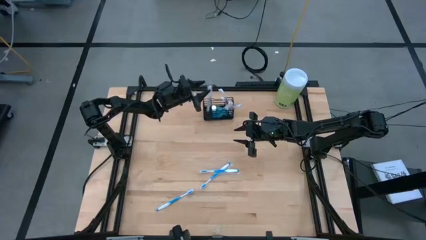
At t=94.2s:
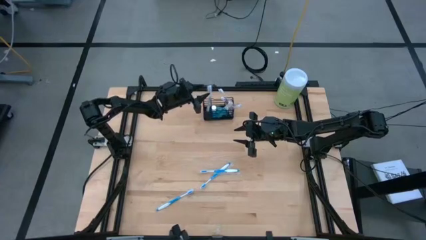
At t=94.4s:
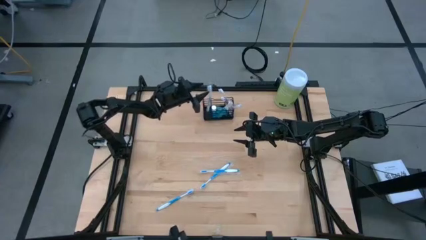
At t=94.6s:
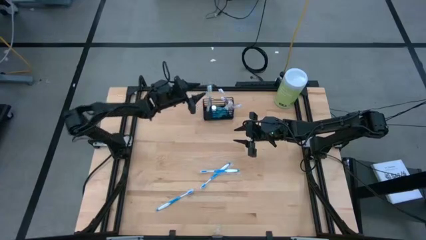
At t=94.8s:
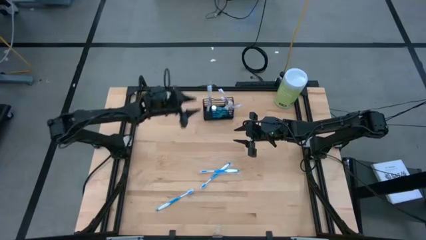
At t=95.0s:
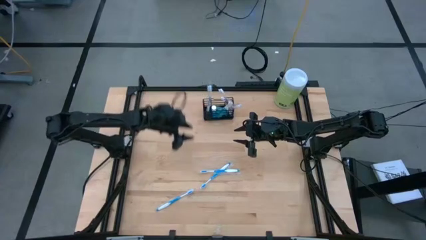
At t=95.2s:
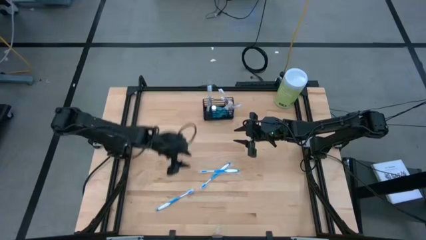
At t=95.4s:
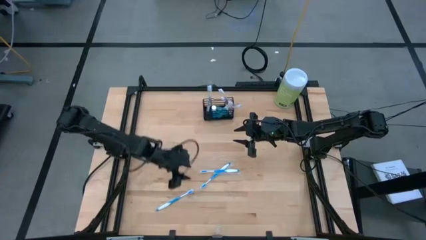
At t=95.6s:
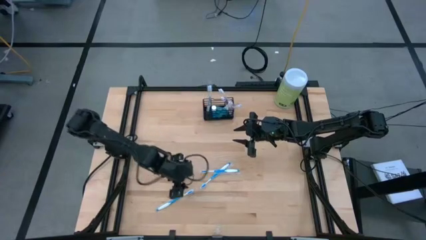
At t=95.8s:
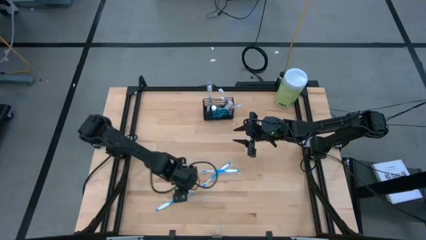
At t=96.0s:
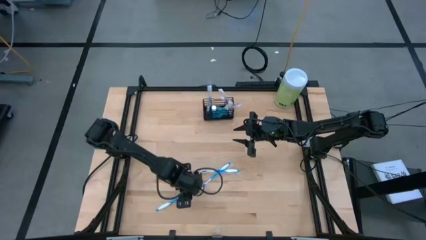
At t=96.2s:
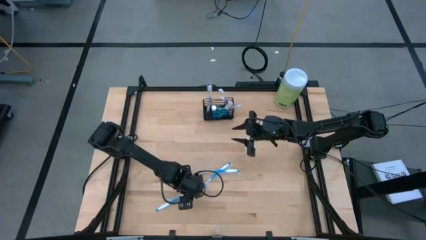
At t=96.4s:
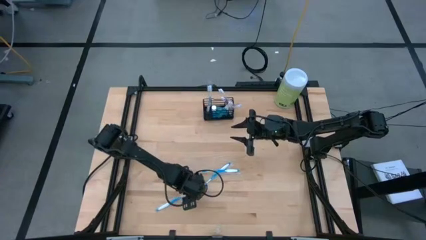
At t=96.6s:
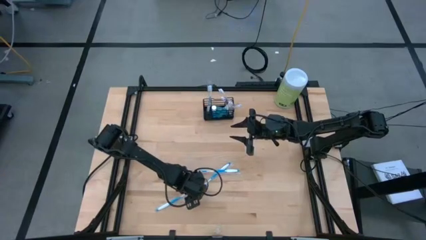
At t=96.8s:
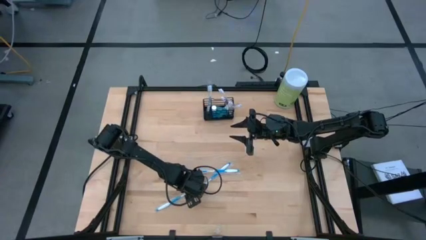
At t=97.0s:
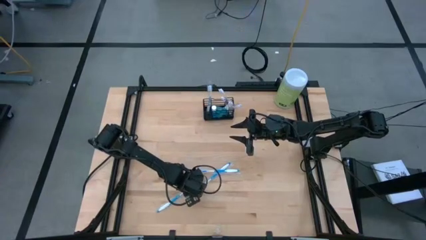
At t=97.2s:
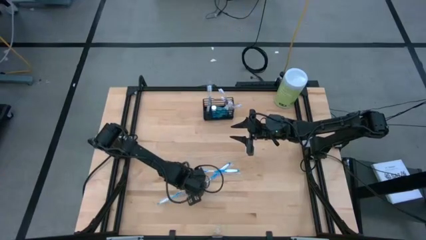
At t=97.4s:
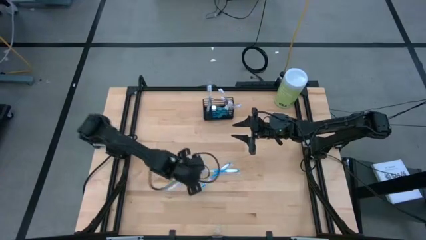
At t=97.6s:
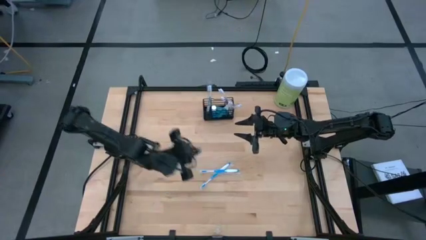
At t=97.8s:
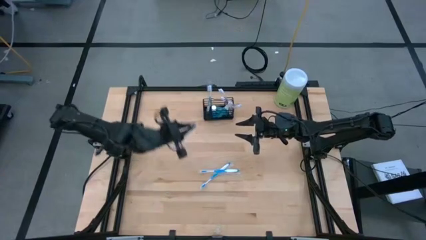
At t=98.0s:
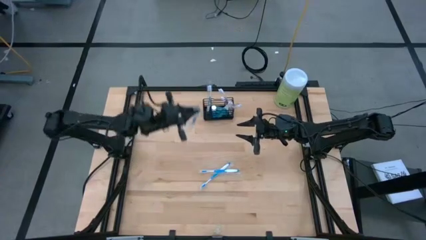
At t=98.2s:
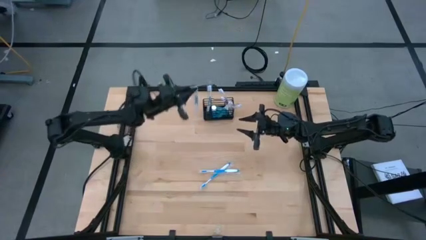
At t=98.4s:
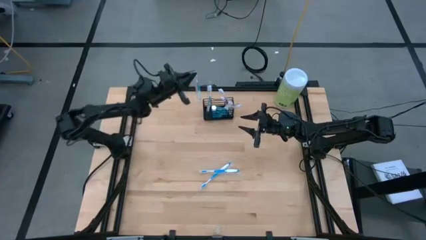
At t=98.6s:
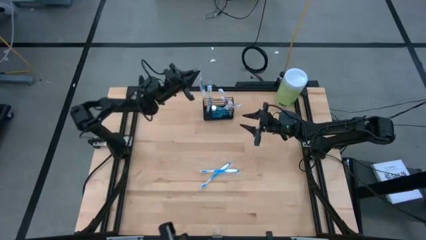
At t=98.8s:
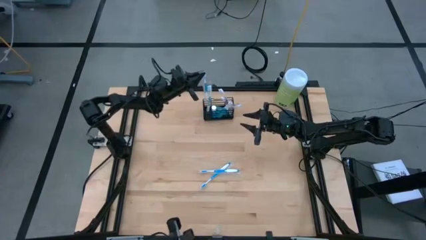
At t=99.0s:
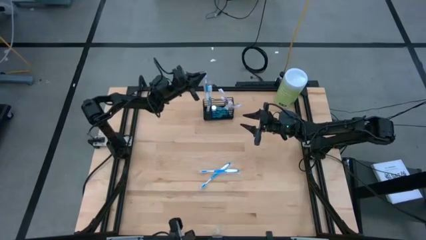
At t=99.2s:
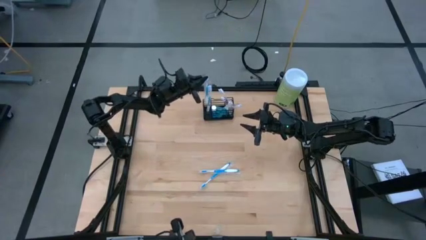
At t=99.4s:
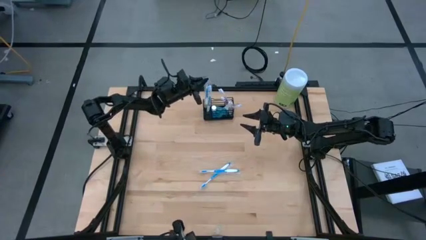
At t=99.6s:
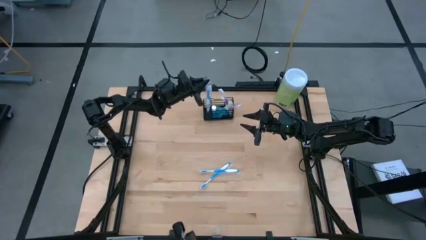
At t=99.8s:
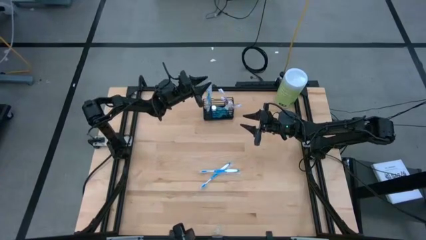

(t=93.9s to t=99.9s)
Task: Pick & Place toothbrushing station
Put the blue toothbrush into the left compartment of the wire organizer

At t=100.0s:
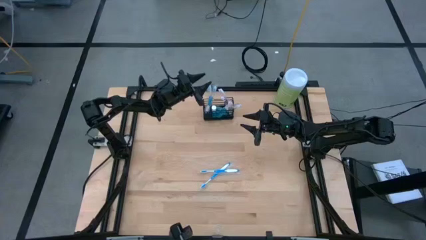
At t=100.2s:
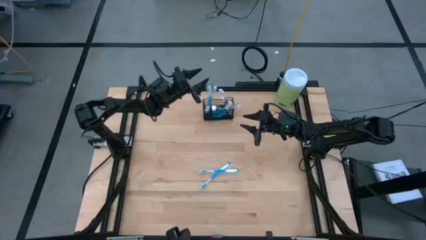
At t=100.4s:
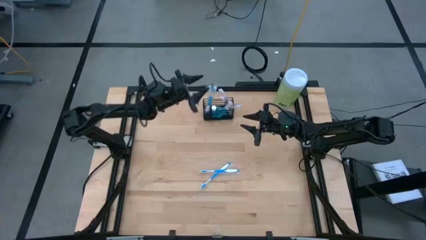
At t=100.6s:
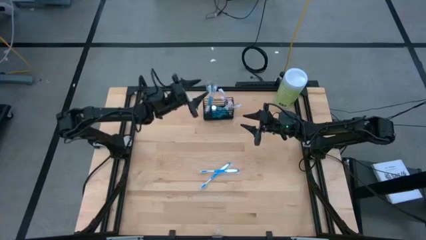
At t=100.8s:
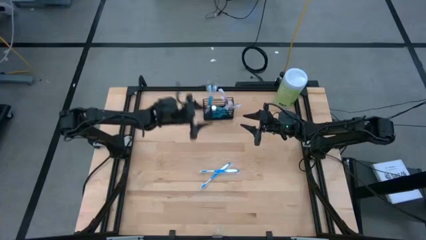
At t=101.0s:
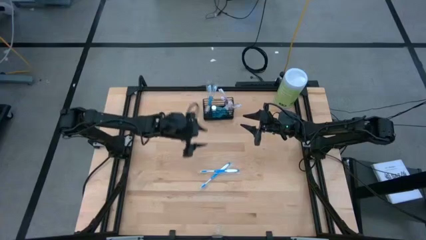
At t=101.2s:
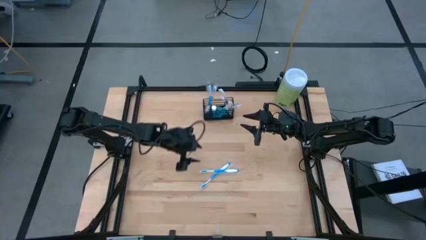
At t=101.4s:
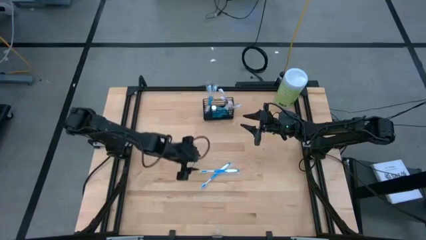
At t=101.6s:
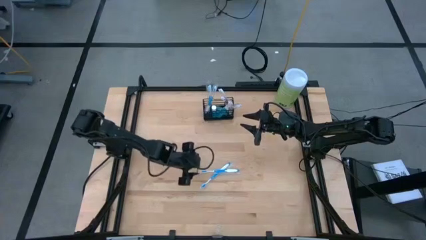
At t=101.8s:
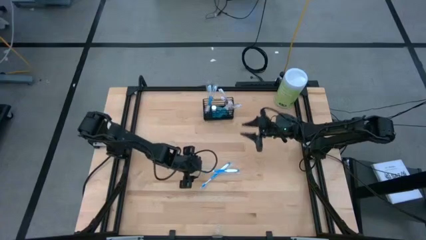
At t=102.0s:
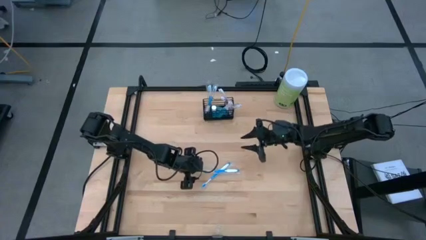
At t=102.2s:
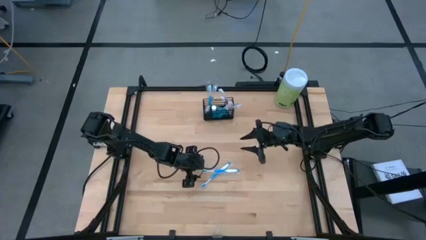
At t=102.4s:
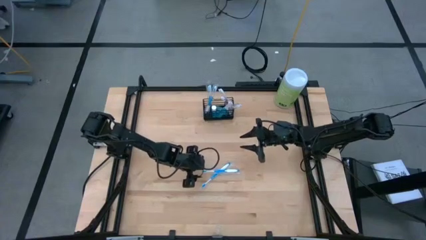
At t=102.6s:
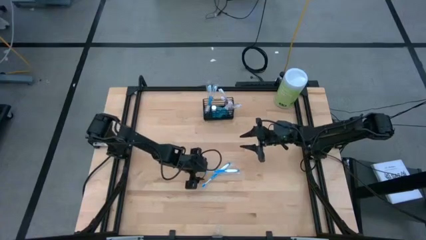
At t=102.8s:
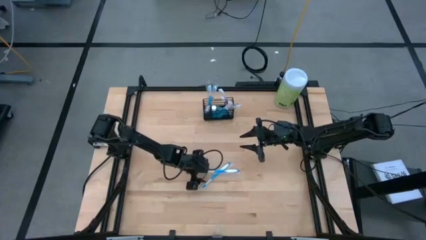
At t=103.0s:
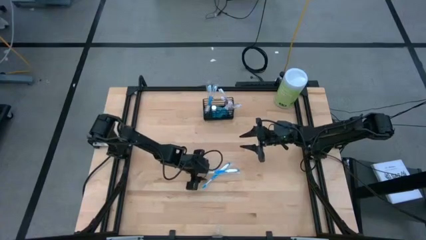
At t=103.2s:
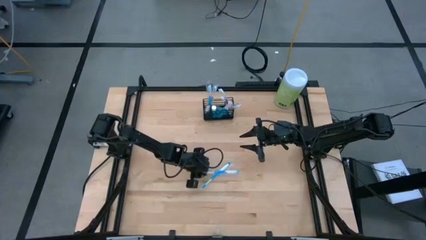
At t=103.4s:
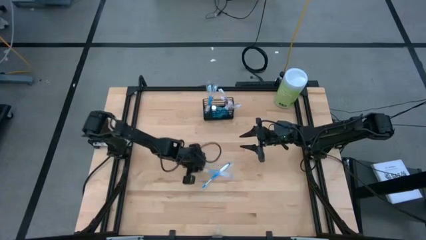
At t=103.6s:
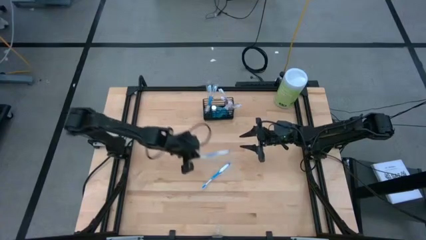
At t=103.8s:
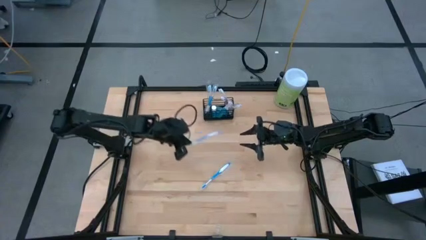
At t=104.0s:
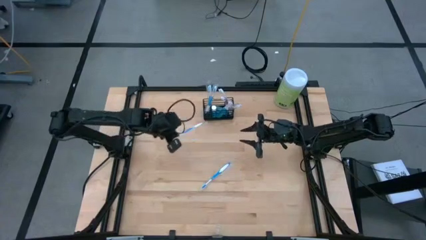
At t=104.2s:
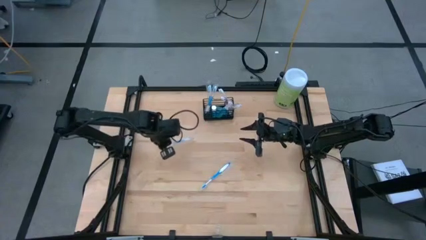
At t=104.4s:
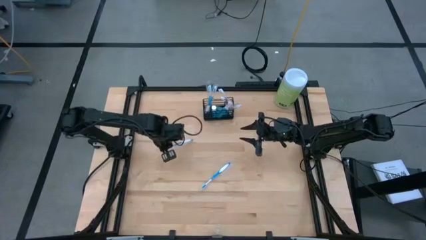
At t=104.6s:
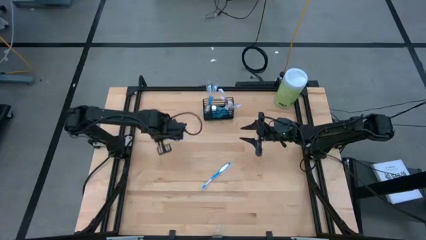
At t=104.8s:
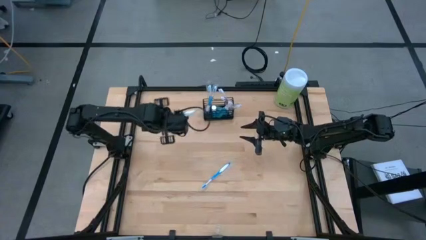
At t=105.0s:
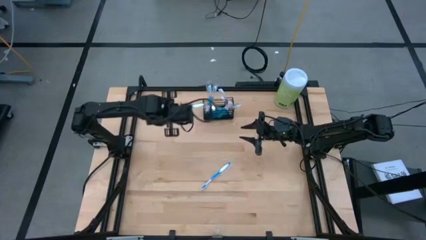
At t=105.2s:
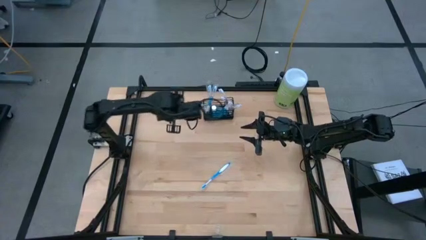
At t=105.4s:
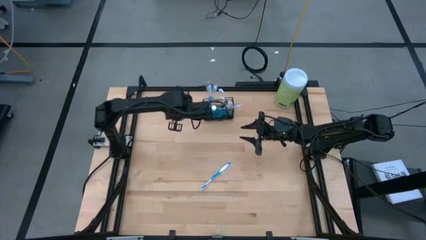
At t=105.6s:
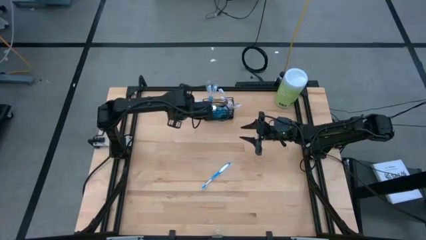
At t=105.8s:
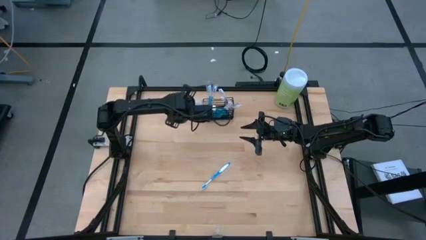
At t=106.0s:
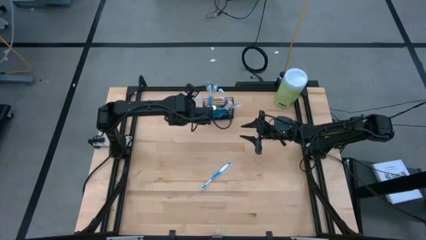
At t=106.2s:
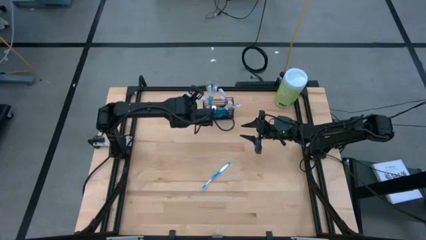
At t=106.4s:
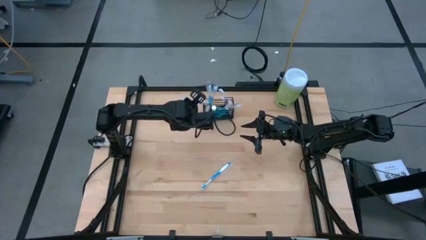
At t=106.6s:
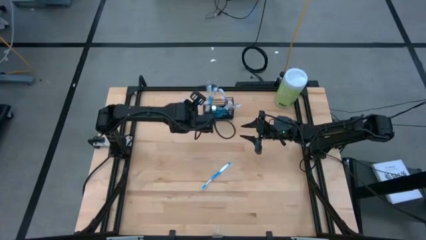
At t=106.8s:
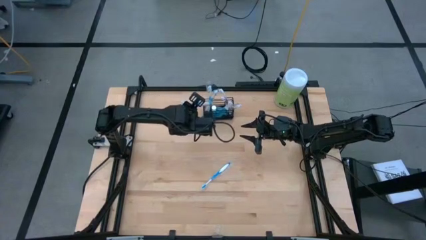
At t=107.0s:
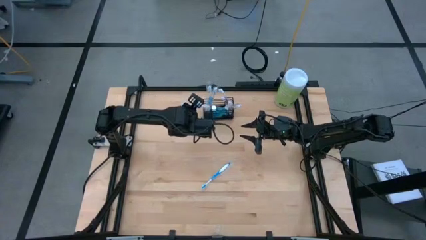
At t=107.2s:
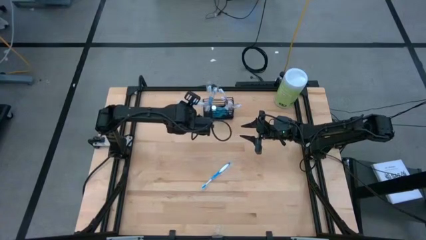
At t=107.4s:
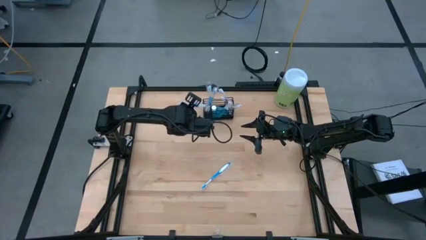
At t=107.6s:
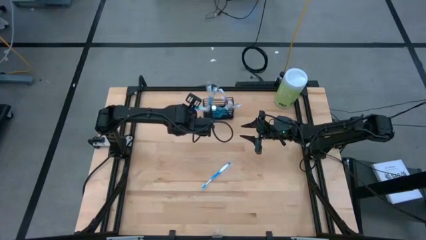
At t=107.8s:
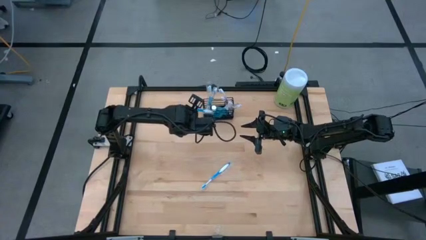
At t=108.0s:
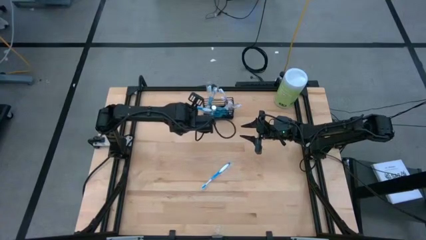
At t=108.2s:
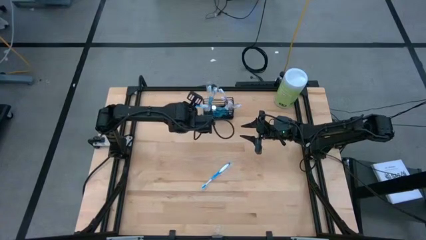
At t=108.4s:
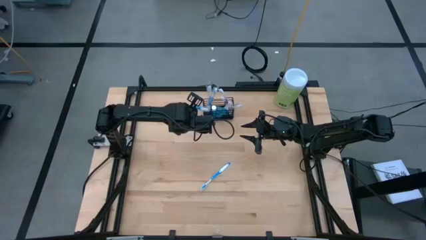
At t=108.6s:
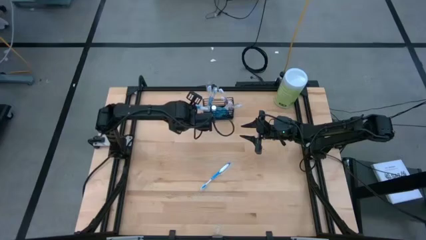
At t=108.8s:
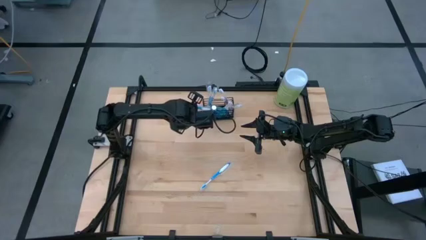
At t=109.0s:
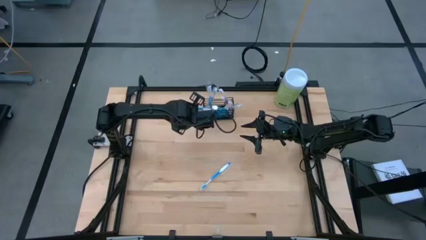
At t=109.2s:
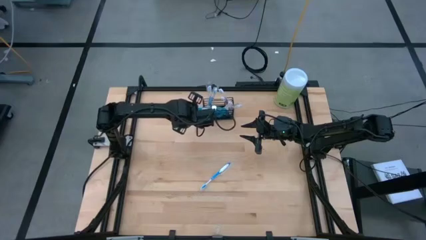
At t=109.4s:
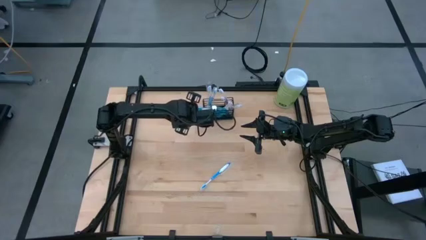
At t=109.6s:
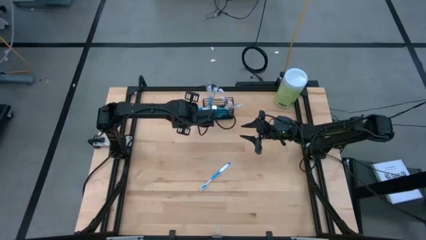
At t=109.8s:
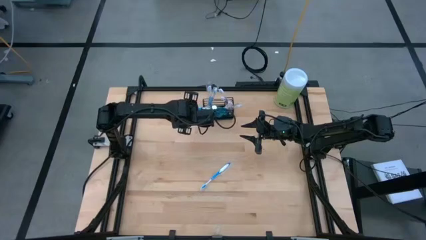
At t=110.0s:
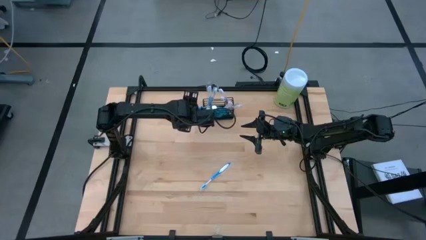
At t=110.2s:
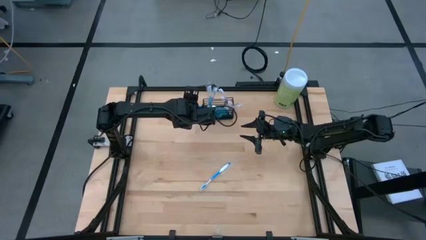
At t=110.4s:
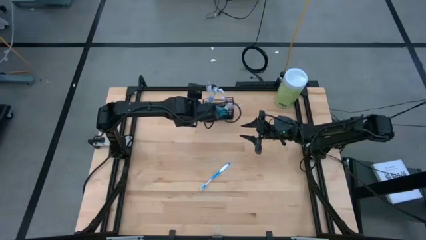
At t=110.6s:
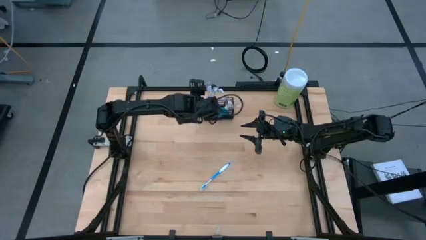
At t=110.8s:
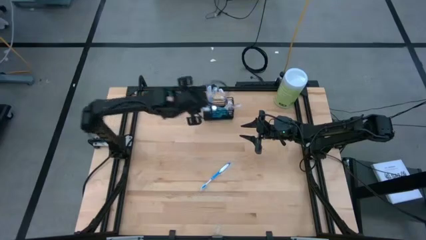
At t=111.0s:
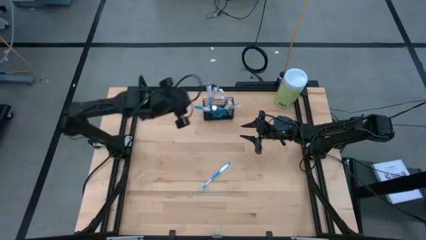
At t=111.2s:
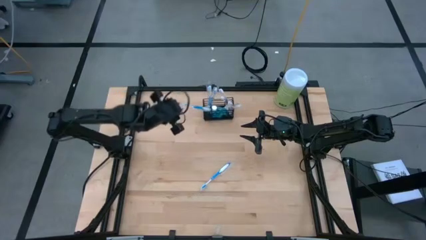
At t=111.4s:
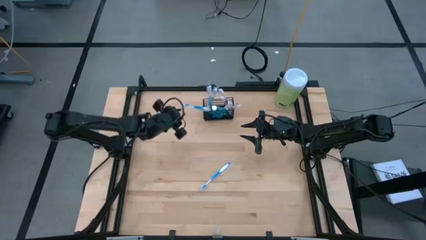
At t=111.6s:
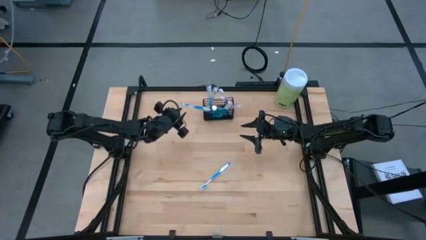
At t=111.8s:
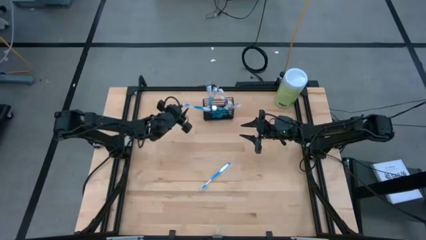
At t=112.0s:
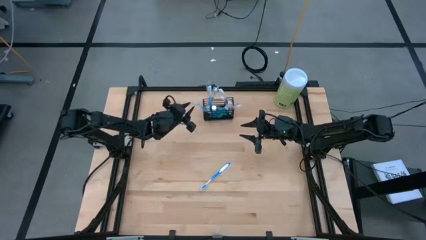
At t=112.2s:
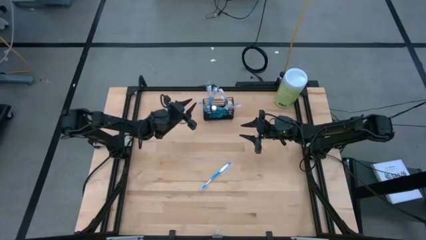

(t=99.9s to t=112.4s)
Put the blue toothbrush into the left compartment of the wire organizer
